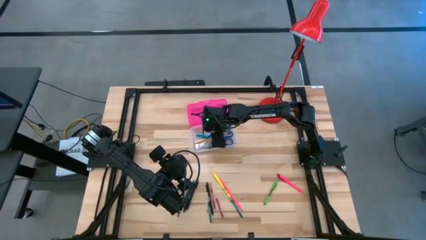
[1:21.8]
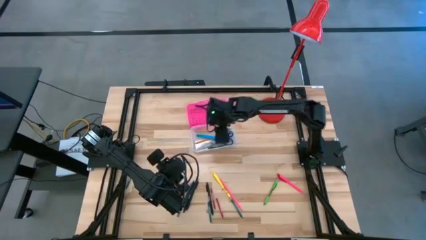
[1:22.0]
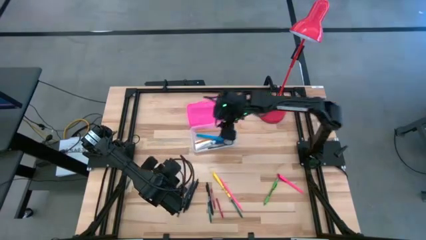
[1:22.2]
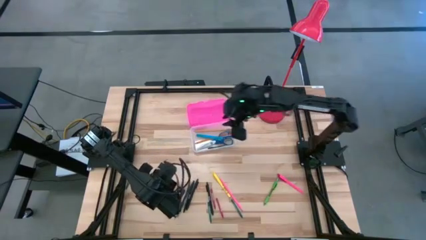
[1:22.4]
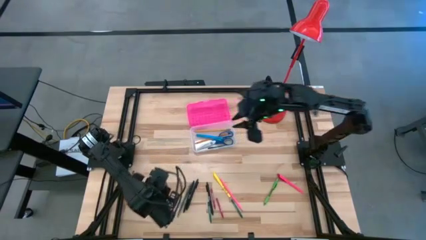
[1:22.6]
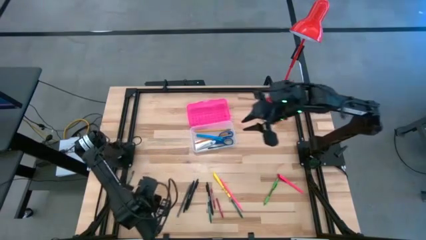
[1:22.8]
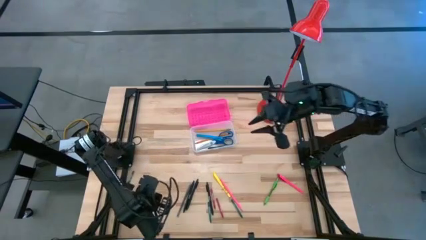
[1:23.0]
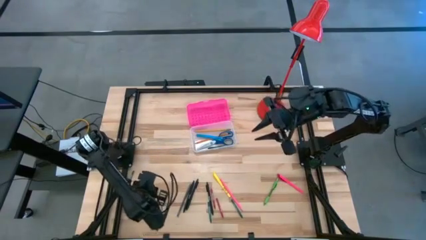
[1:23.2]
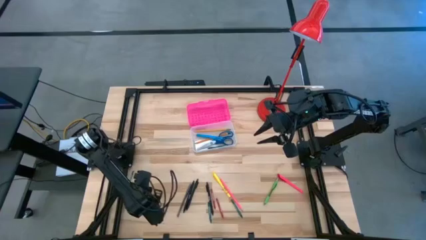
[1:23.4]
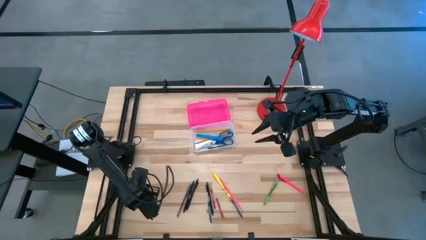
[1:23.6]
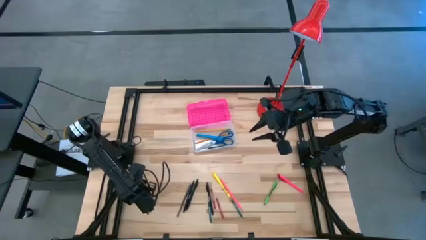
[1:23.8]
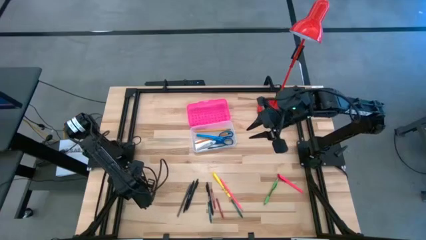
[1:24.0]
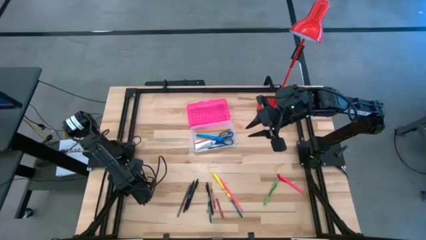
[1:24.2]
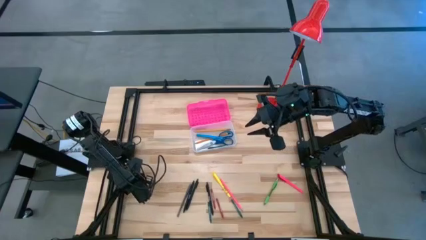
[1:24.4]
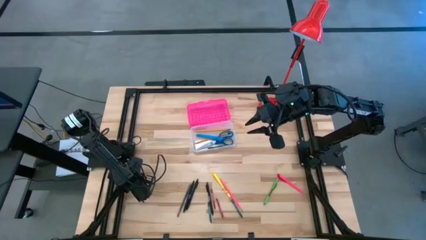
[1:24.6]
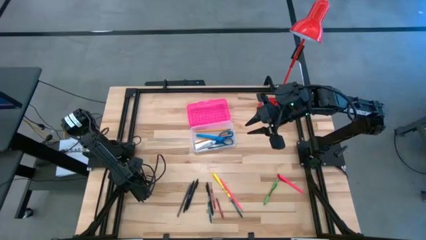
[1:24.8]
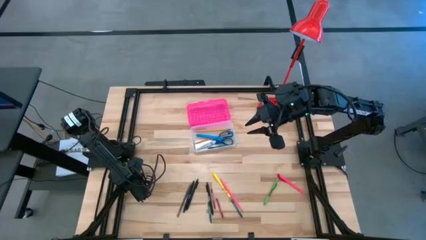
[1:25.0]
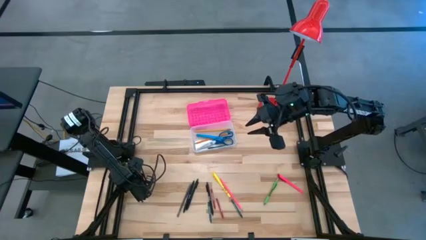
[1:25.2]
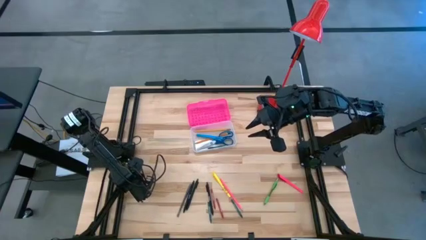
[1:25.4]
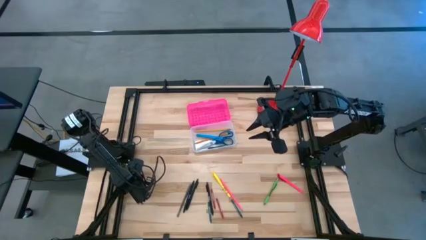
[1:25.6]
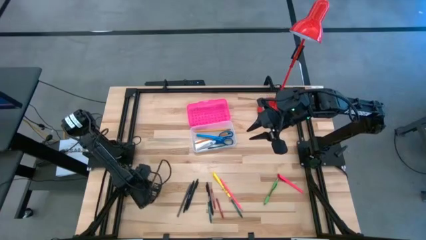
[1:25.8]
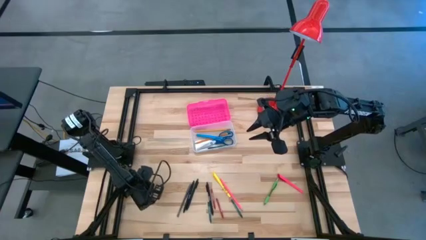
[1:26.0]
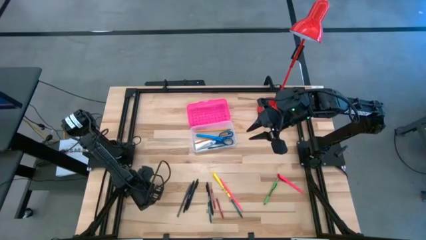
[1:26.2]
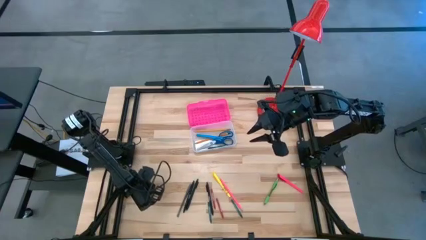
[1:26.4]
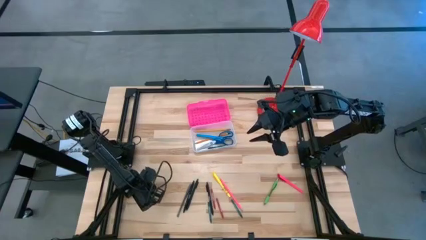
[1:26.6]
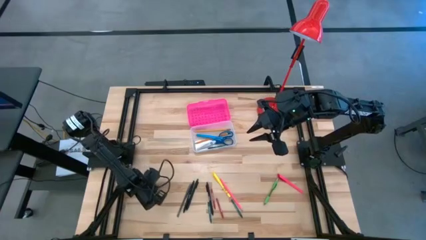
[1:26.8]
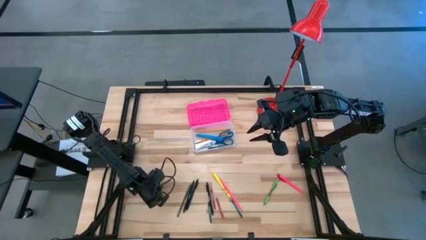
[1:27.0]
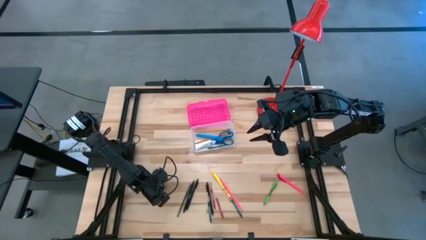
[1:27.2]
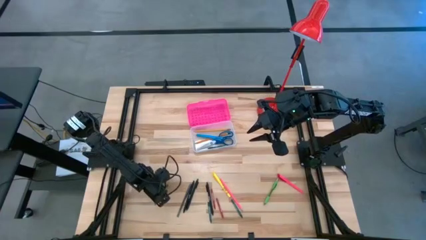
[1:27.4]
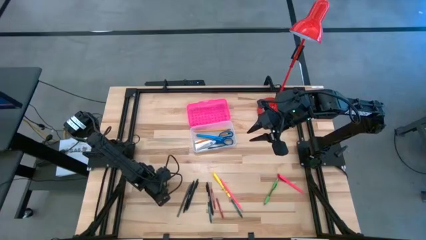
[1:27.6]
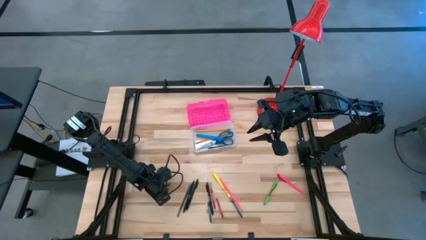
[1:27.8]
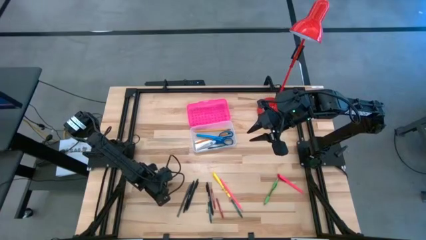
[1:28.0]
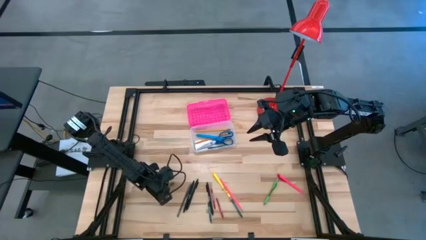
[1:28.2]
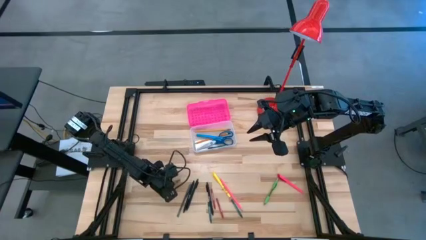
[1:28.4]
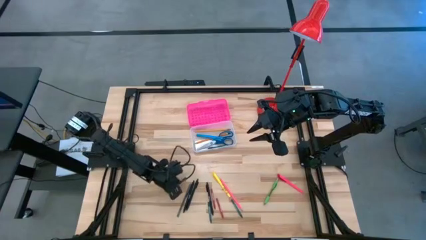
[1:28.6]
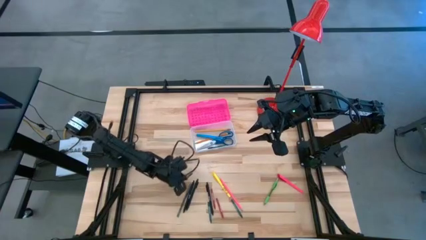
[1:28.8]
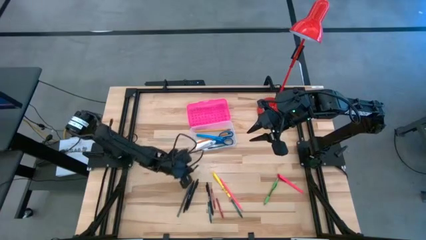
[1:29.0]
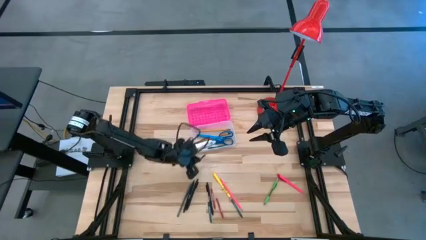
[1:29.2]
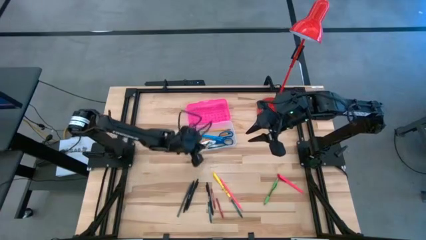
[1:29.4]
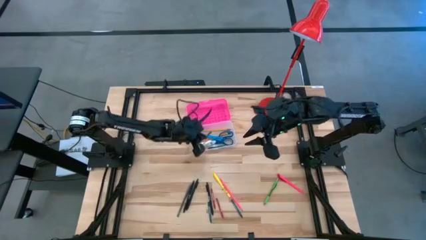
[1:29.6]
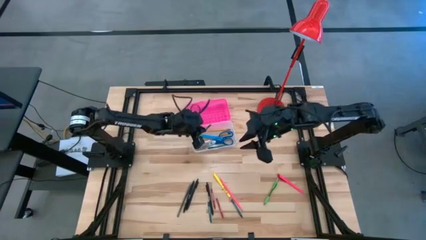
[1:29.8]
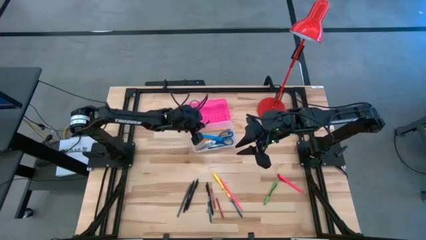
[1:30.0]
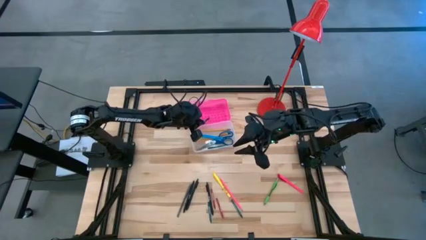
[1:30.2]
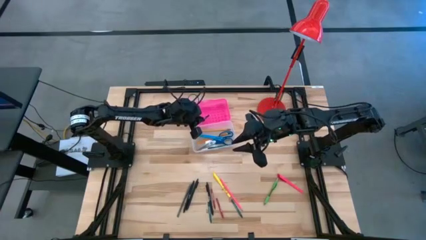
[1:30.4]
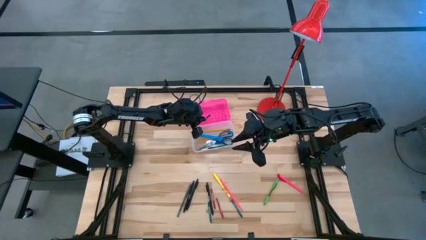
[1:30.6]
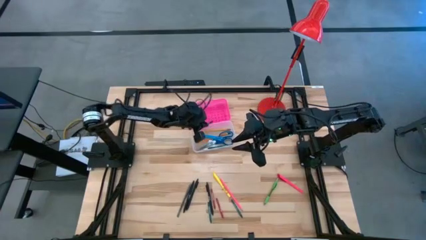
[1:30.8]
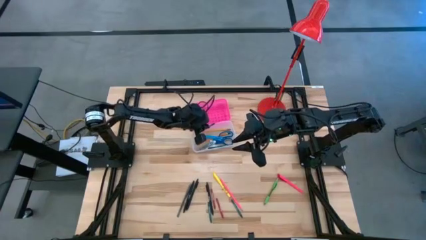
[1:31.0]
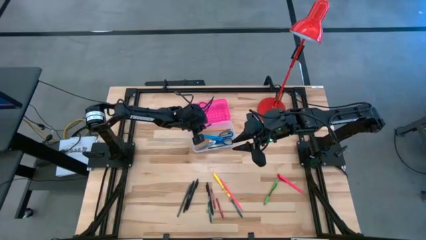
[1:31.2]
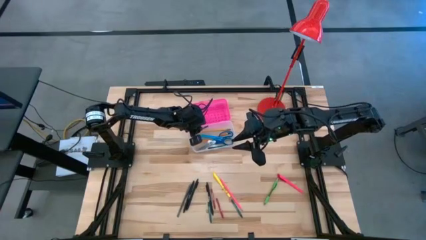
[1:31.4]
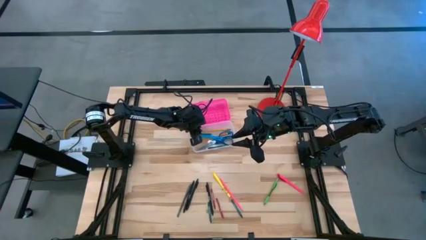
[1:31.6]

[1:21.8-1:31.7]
Task: Pick & place school supplies into a supply box
Put the green crayon into the pink supply box

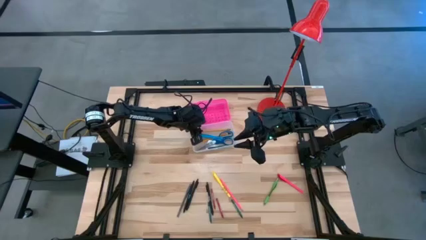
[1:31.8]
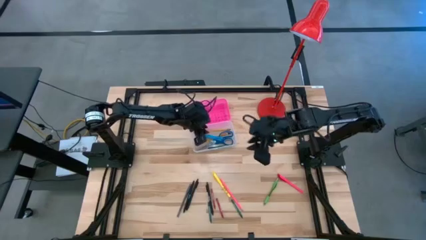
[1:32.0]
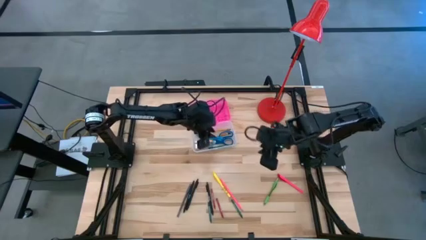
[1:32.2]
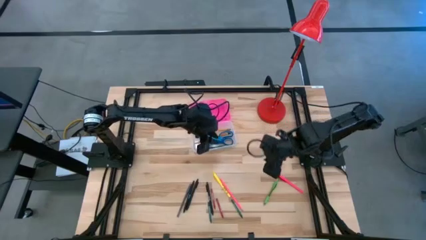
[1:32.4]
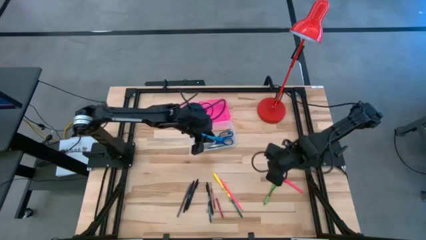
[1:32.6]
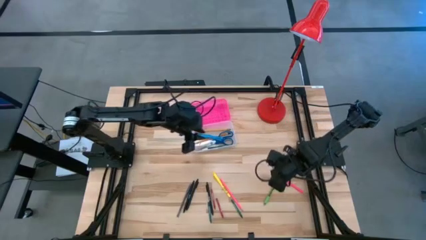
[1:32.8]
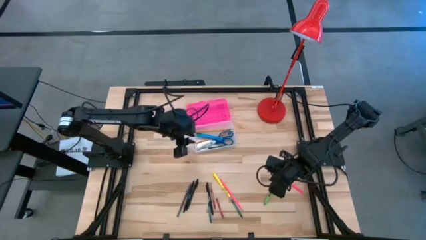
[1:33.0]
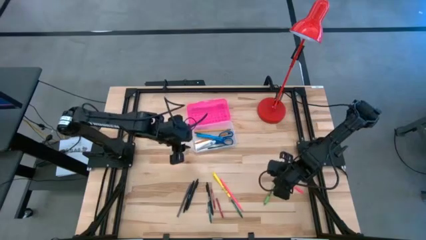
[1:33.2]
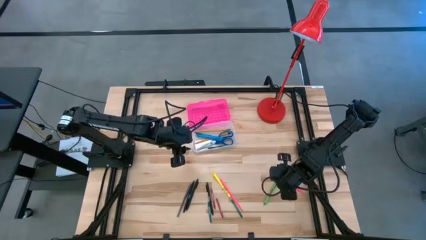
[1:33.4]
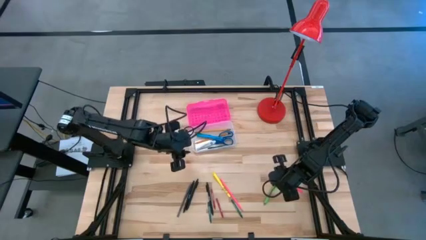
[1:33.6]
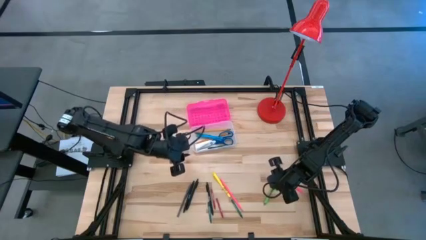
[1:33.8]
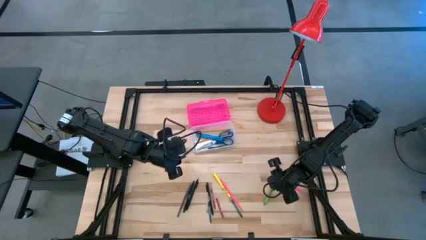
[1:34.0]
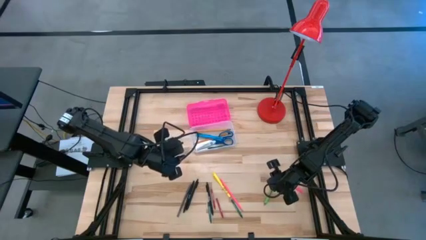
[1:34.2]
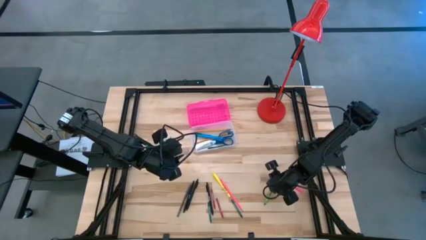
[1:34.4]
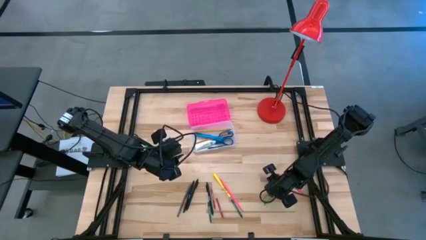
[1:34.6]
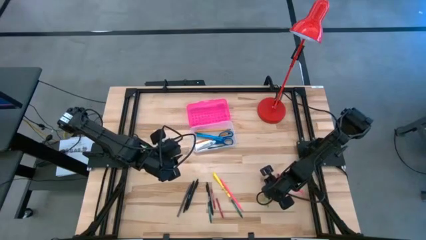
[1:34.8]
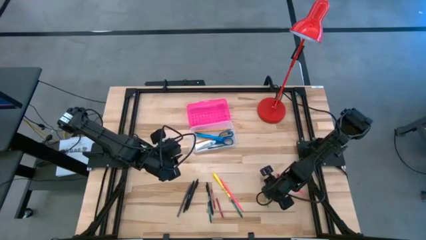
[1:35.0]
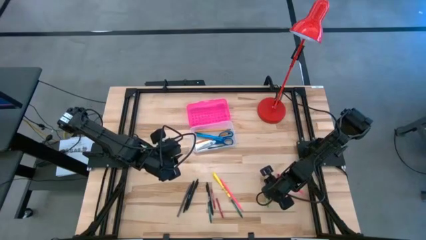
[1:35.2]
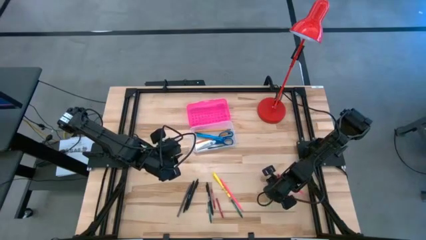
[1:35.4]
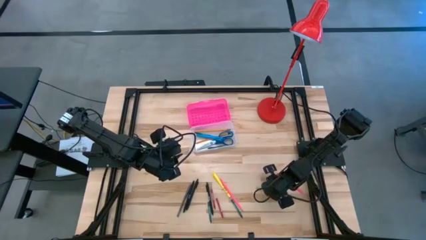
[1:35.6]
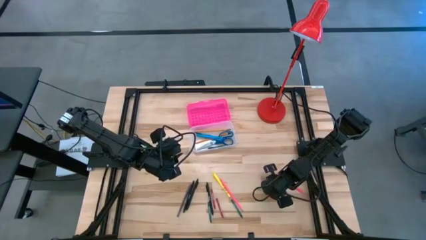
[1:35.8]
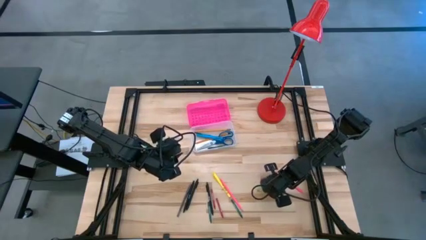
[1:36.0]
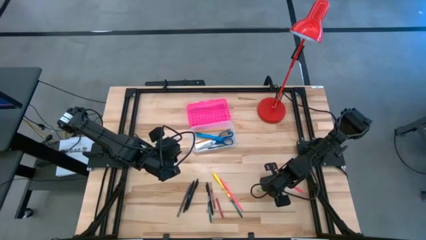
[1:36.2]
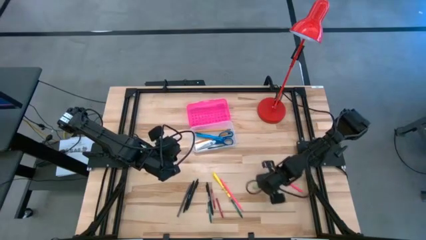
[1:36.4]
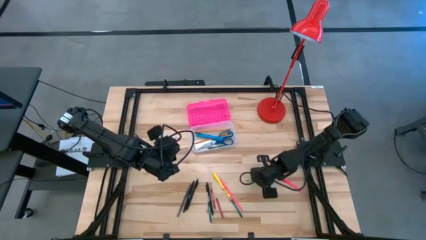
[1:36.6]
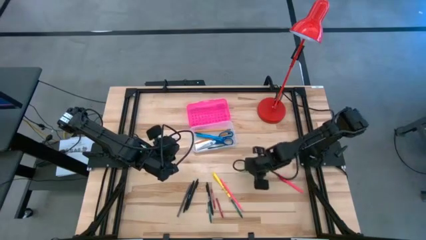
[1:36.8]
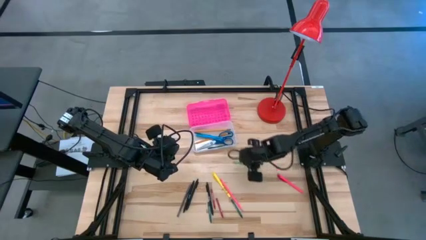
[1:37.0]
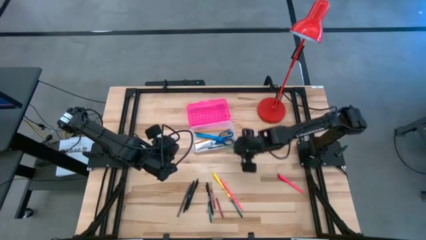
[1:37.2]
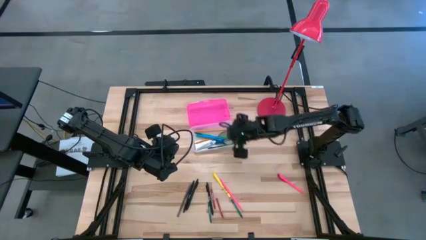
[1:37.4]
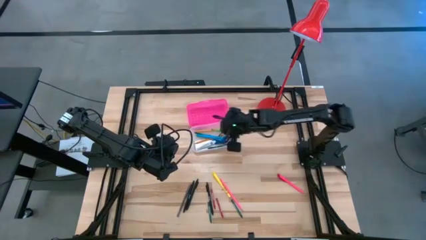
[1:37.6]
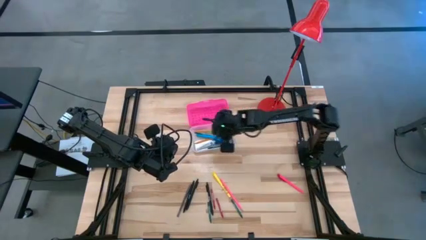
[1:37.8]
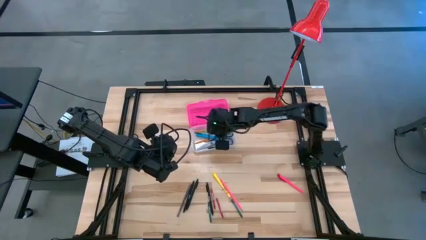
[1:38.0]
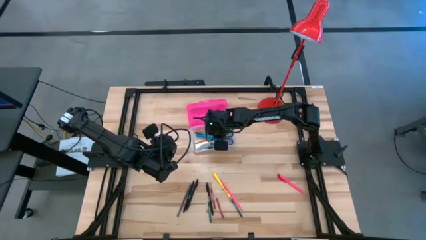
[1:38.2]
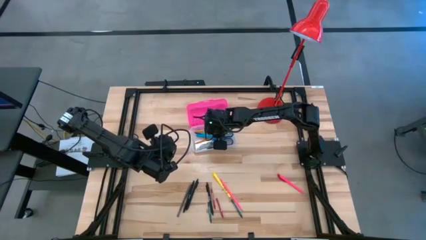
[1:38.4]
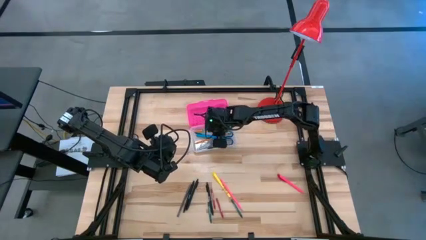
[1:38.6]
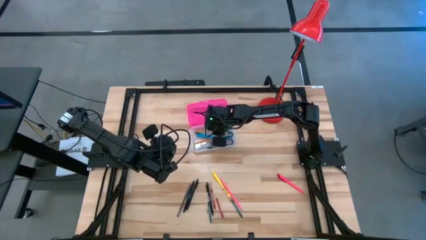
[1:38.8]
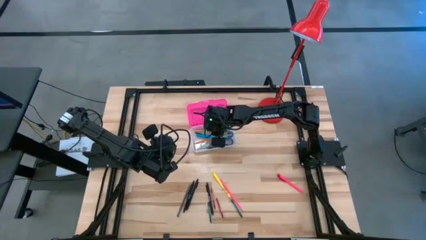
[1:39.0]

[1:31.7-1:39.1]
Put the green pen into the pink supply box
